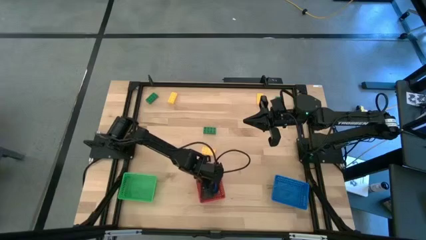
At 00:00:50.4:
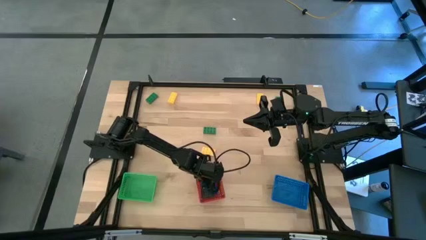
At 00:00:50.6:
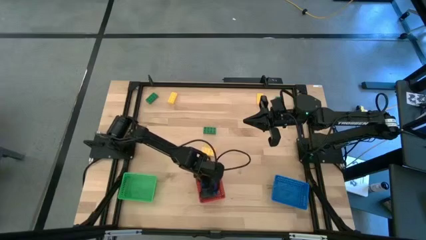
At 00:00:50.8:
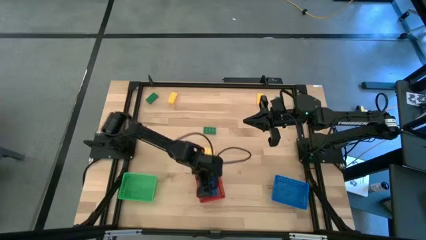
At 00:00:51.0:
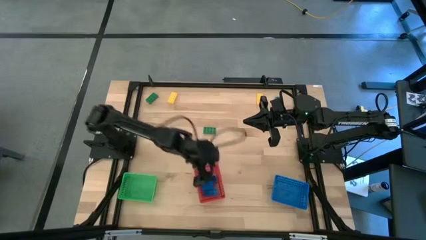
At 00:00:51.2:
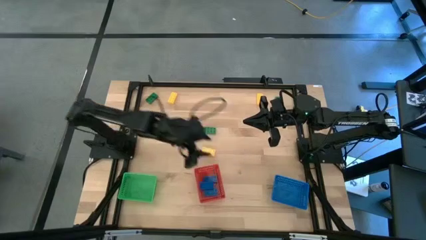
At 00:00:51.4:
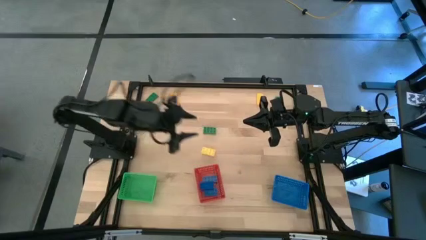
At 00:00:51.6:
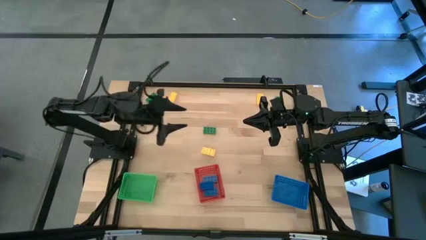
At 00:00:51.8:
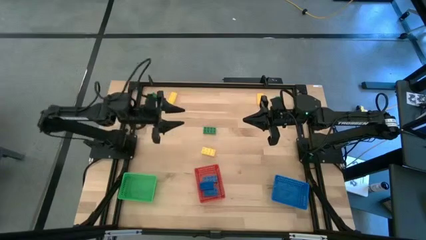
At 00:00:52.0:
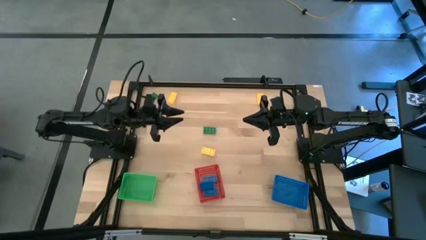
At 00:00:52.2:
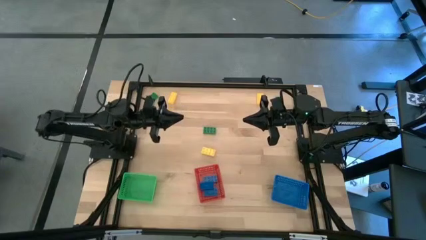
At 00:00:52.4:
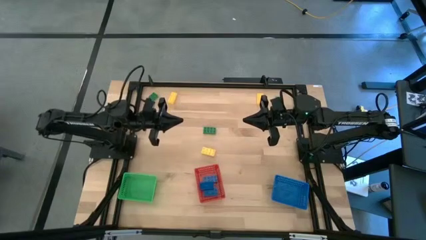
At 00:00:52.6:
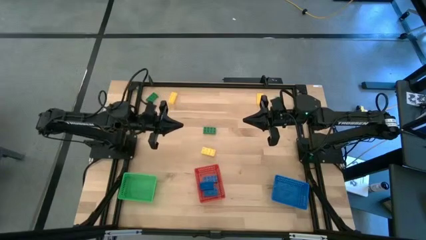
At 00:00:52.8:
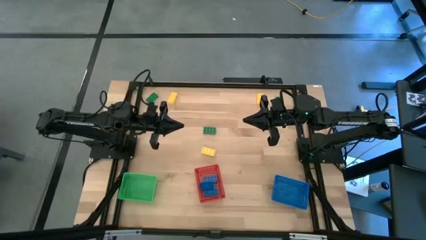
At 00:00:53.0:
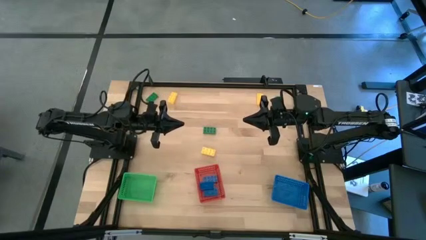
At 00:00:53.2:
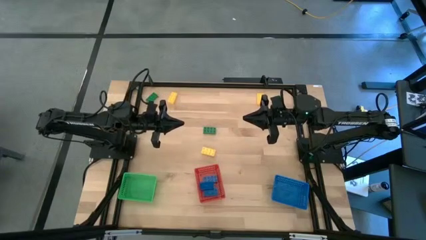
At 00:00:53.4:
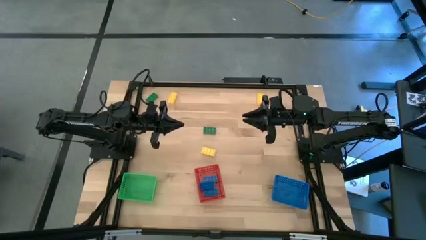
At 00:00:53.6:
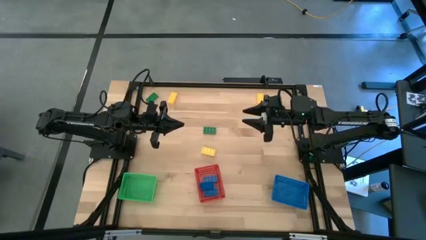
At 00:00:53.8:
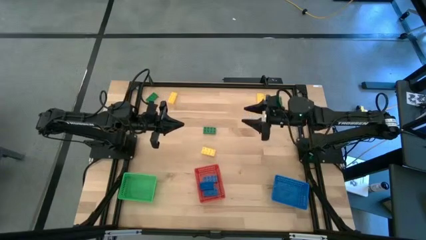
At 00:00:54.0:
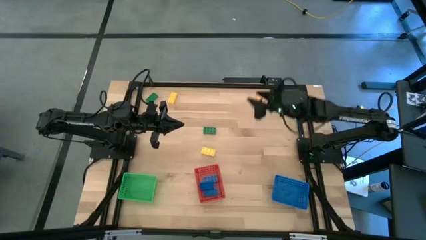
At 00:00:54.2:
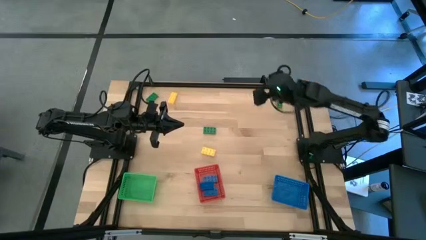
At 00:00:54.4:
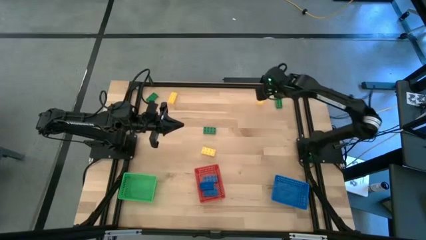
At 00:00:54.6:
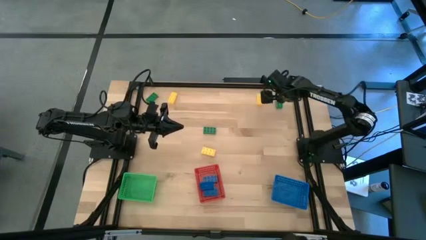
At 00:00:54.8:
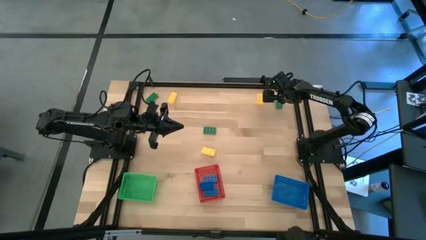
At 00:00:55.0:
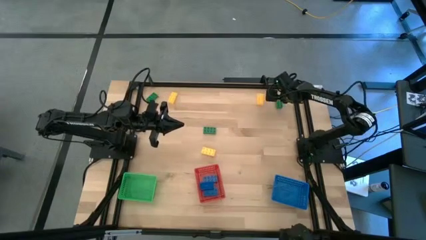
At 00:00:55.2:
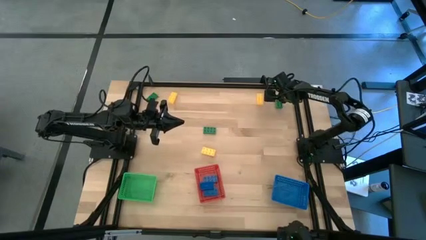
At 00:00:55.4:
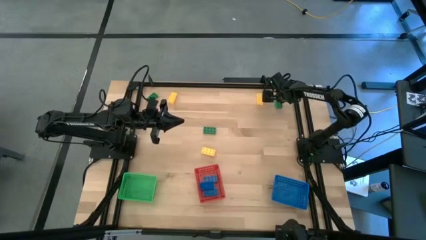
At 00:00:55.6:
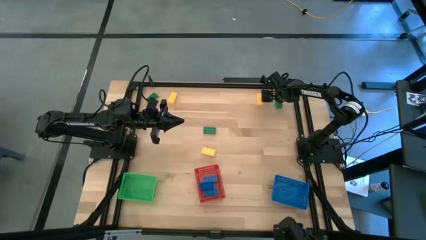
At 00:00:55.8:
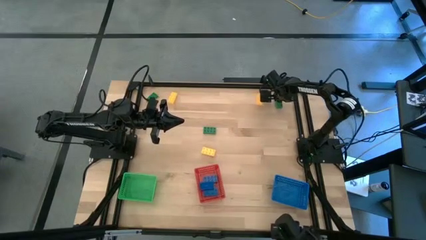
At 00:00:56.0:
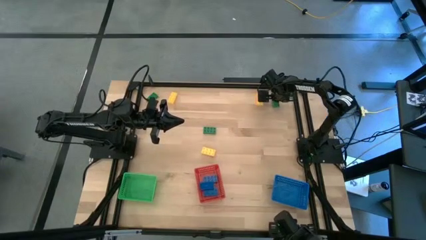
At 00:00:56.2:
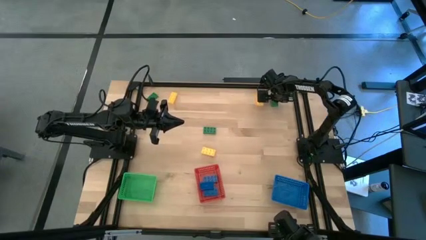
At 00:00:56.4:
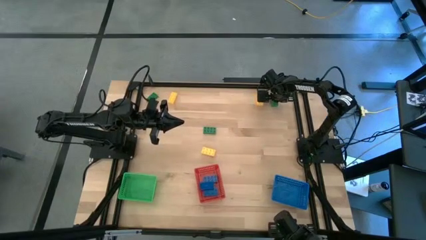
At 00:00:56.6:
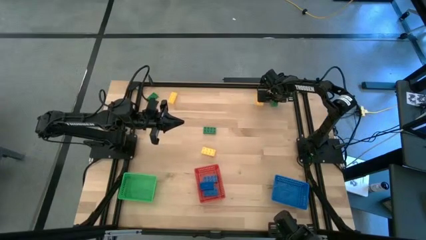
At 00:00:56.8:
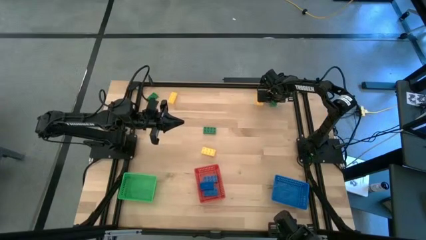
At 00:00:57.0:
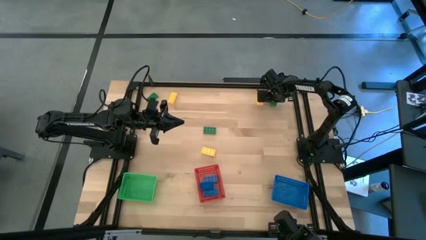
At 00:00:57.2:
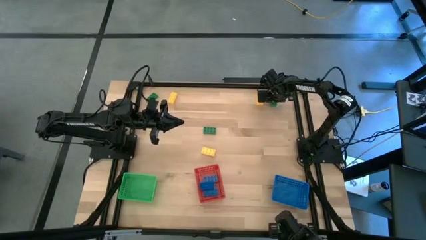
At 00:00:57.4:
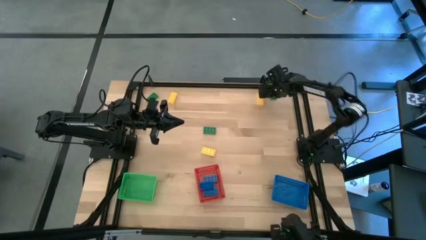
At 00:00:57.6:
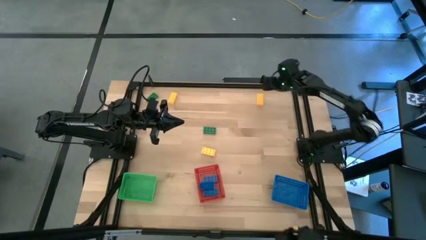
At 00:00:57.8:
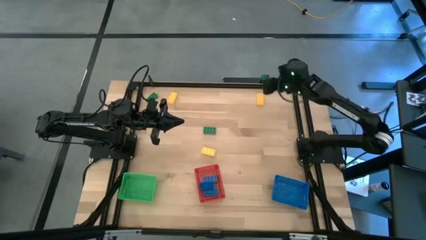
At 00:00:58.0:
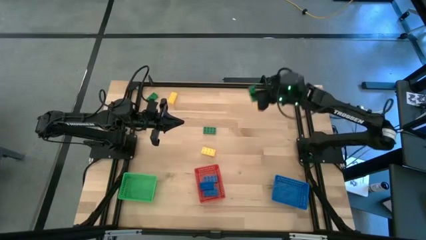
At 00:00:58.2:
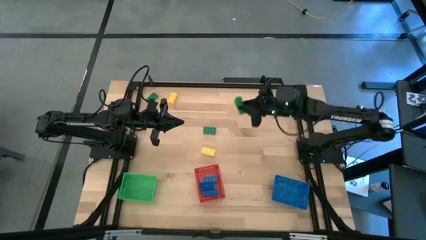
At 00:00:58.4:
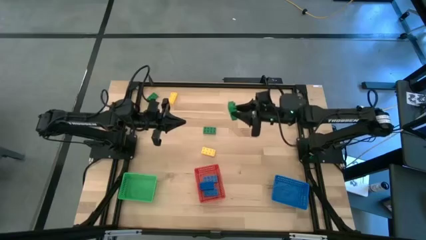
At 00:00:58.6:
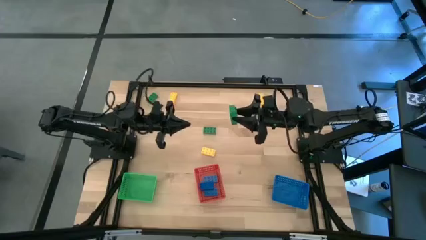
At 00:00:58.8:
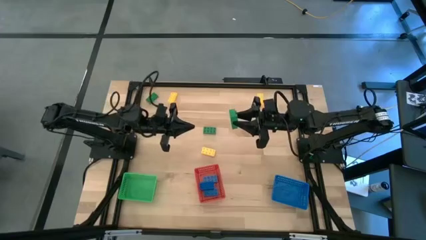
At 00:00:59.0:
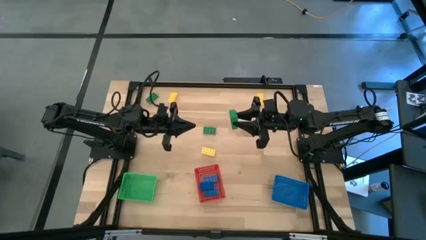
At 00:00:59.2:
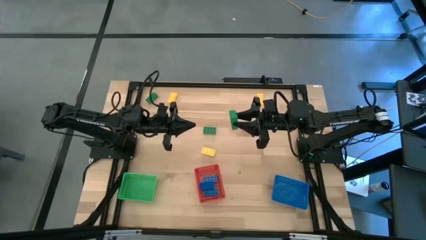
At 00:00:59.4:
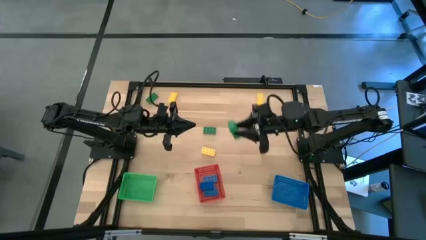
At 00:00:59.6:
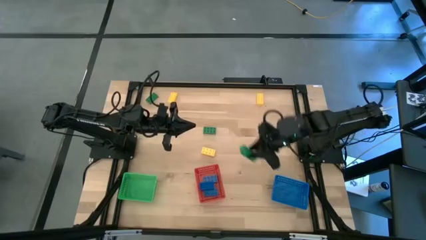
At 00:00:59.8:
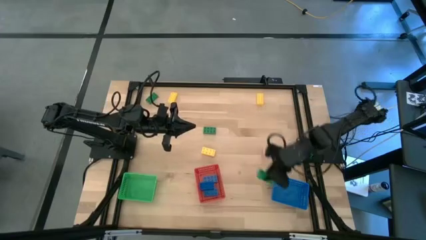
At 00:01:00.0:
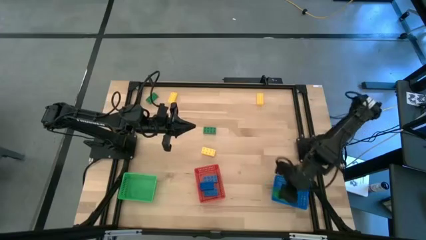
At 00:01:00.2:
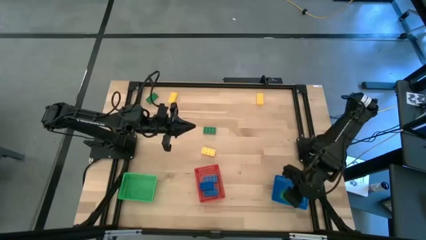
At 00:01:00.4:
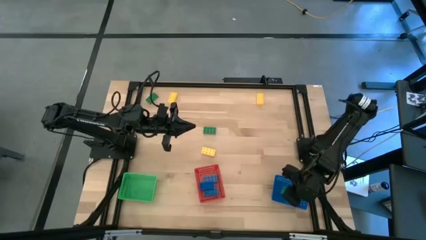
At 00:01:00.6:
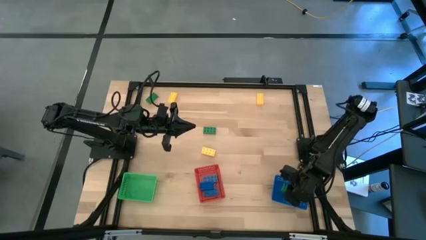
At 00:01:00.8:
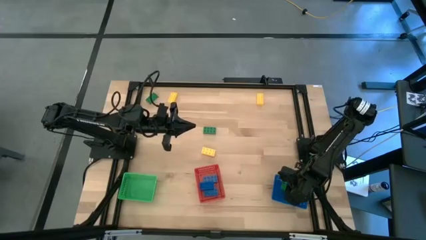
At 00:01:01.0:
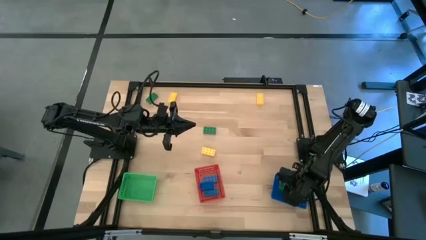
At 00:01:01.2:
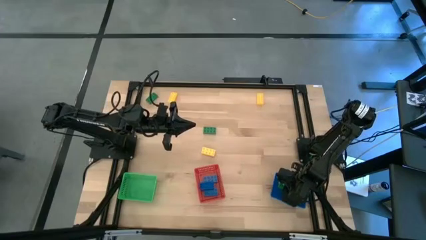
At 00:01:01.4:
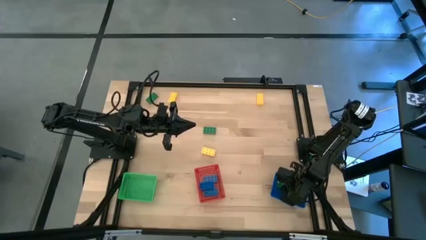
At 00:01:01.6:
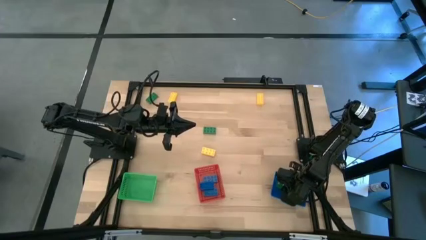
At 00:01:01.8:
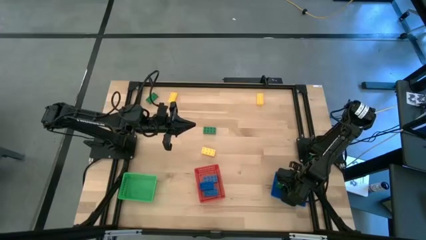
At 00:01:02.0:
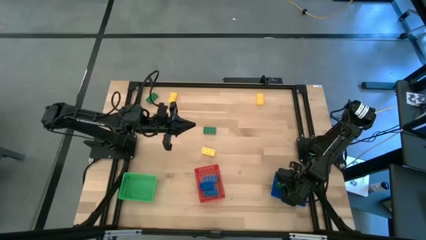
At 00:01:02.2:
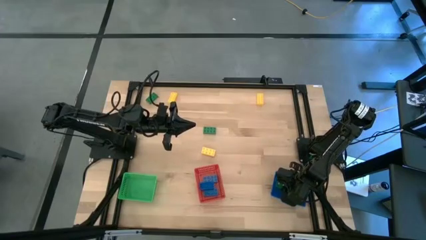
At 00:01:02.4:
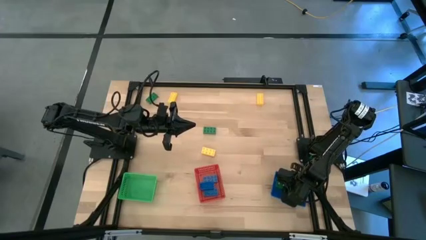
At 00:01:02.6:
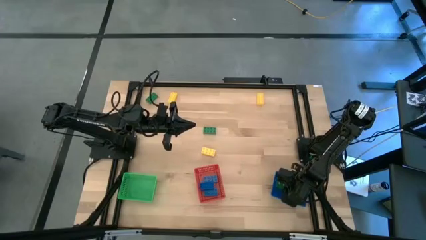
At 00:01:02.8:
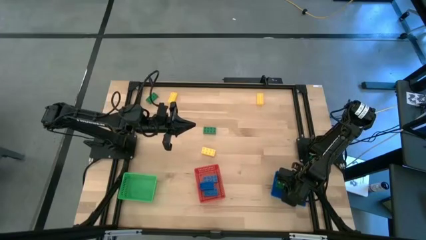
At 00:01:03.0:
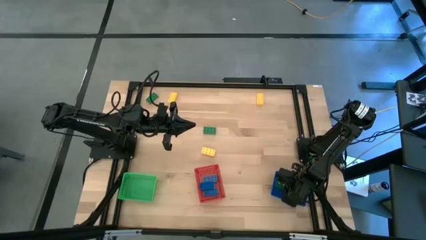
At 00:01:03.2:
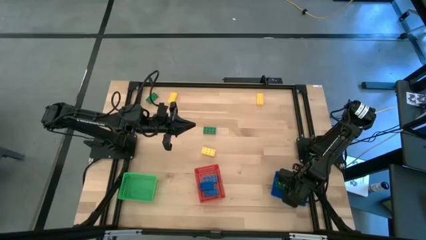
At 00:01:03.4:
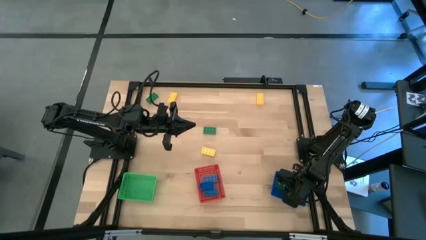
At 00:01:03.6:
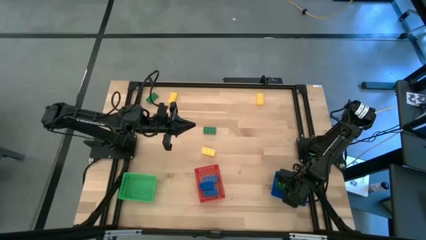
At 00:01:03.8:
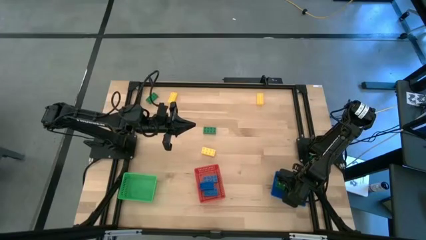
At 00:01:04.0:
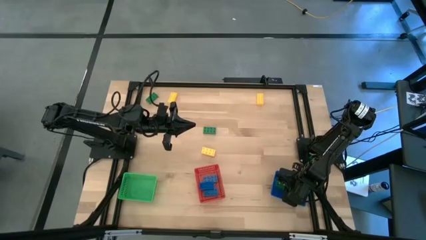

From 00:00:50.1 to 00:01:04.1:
Task: Sort & place blocks by color
Put the top right green game piece into the blue bin
